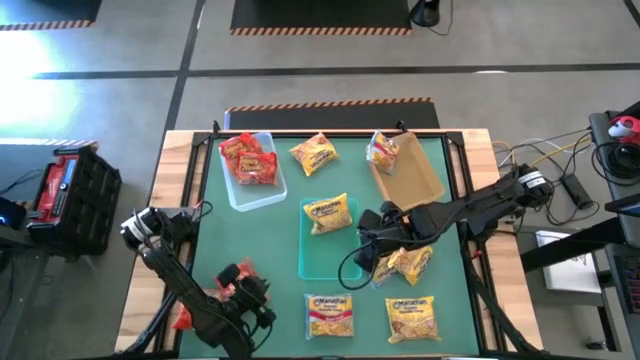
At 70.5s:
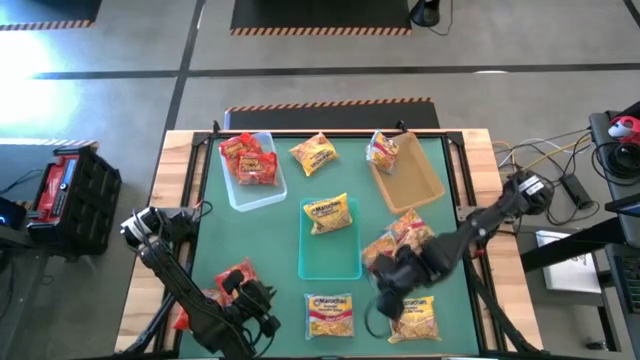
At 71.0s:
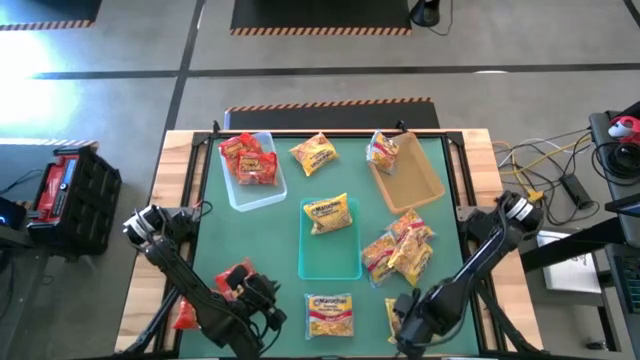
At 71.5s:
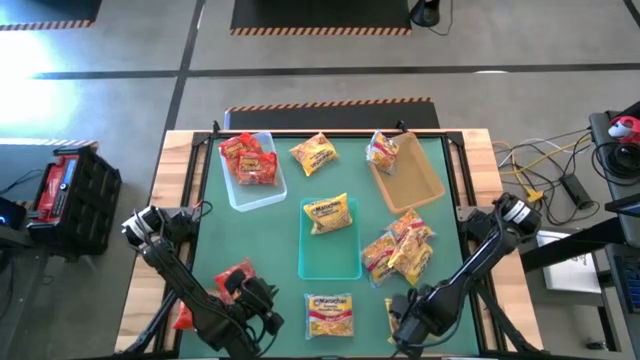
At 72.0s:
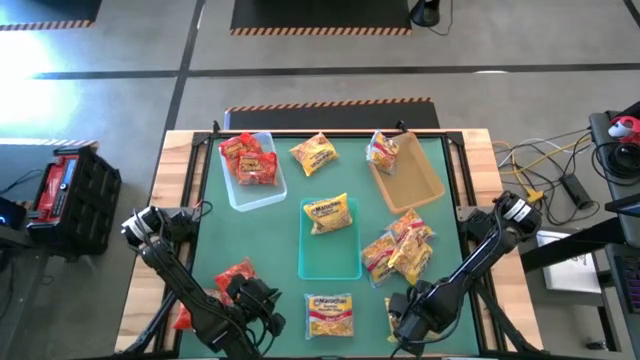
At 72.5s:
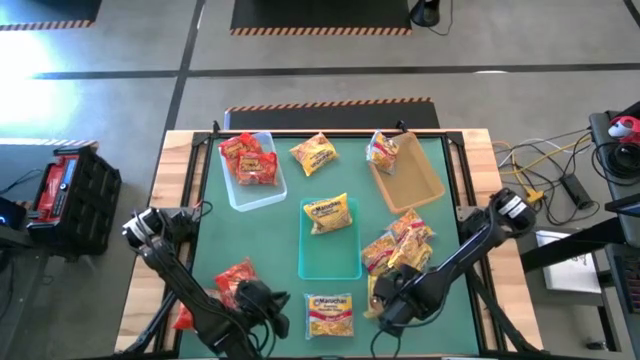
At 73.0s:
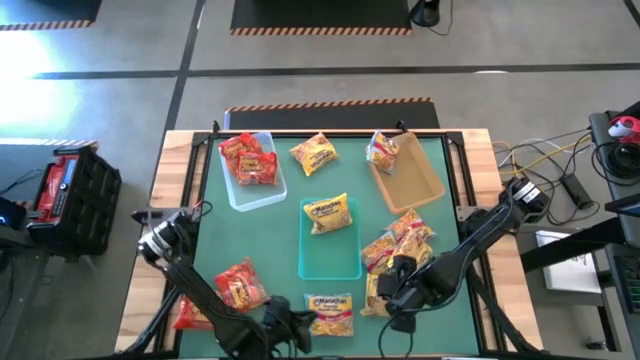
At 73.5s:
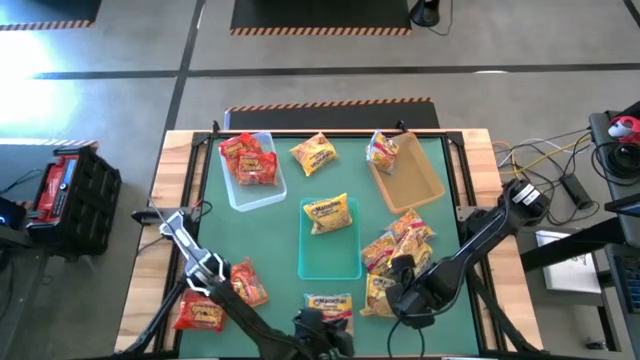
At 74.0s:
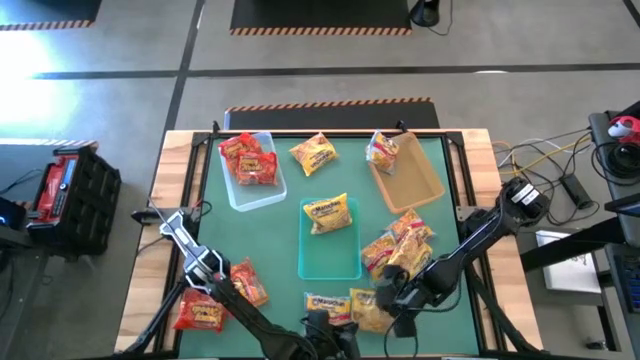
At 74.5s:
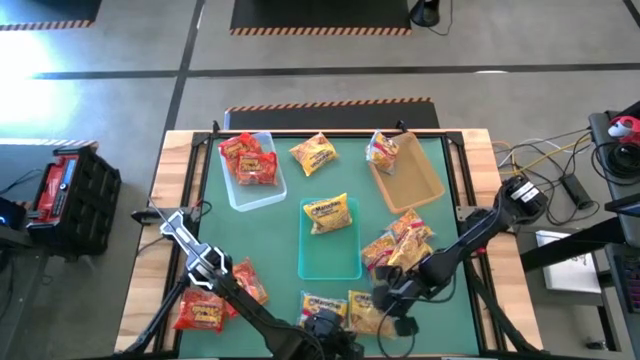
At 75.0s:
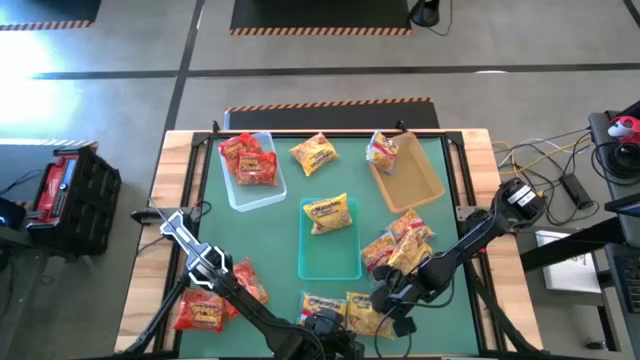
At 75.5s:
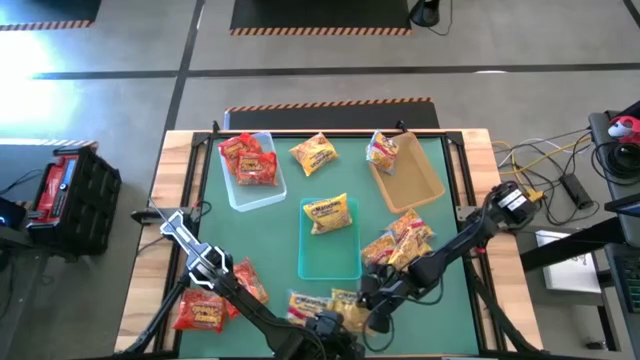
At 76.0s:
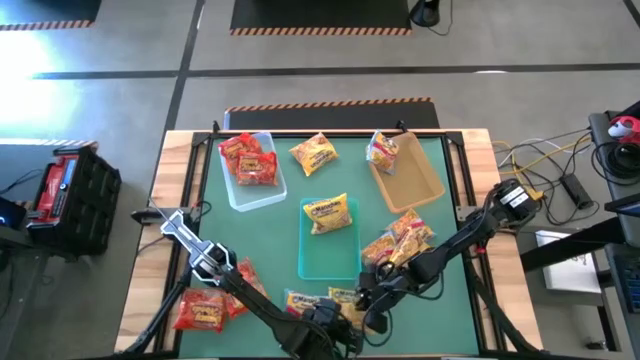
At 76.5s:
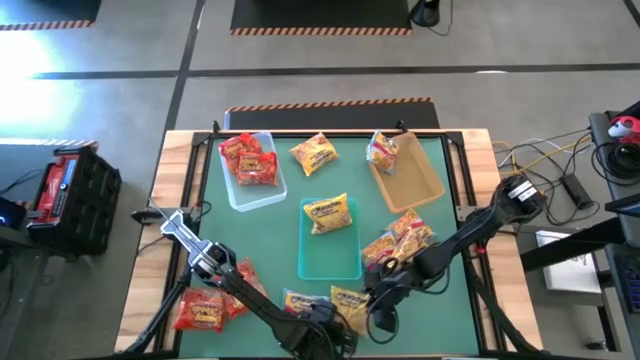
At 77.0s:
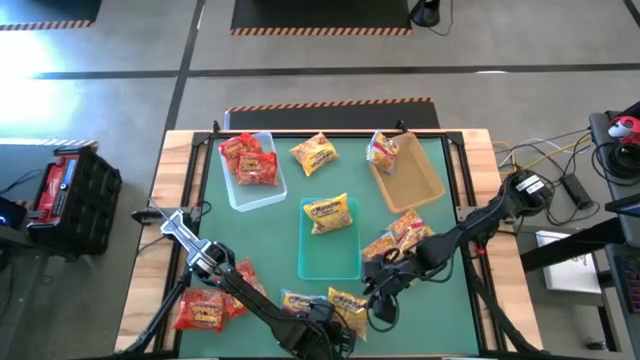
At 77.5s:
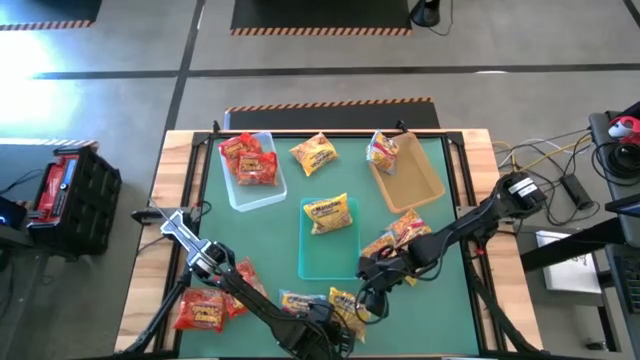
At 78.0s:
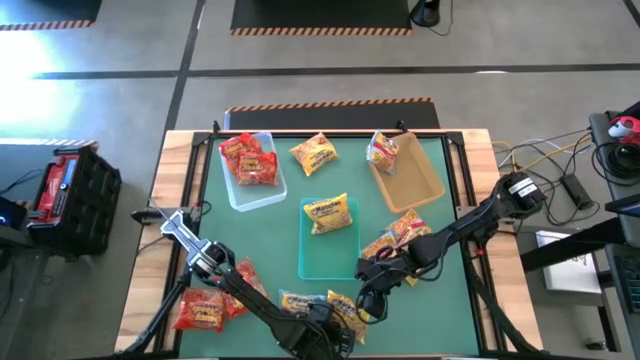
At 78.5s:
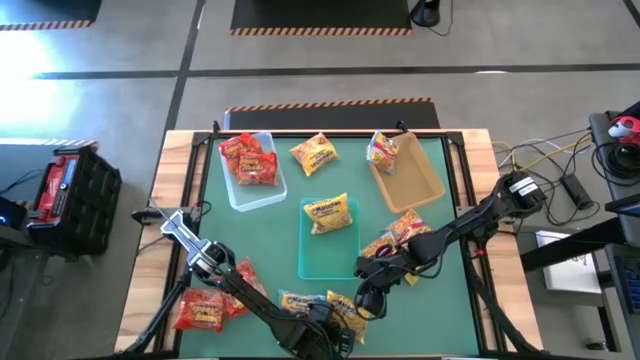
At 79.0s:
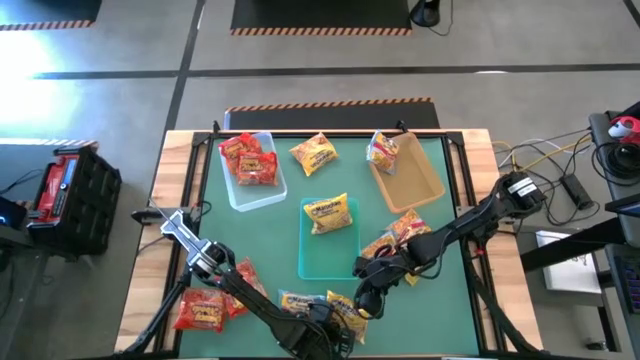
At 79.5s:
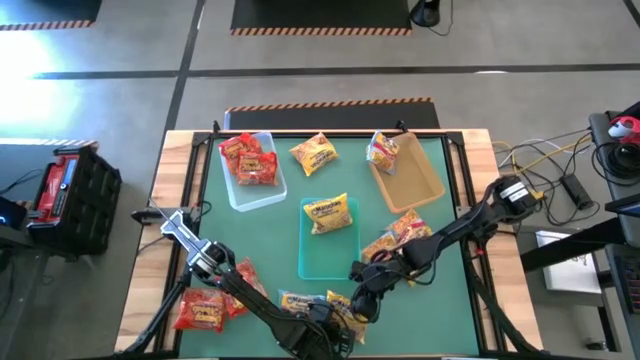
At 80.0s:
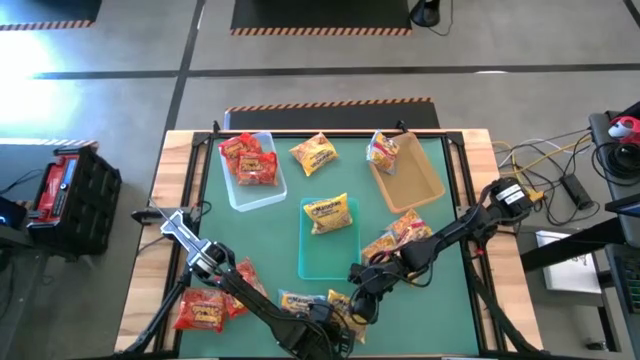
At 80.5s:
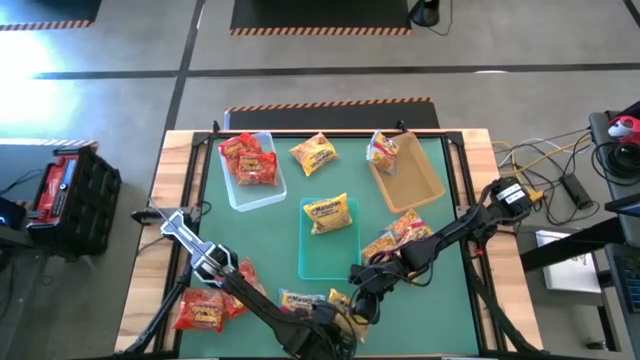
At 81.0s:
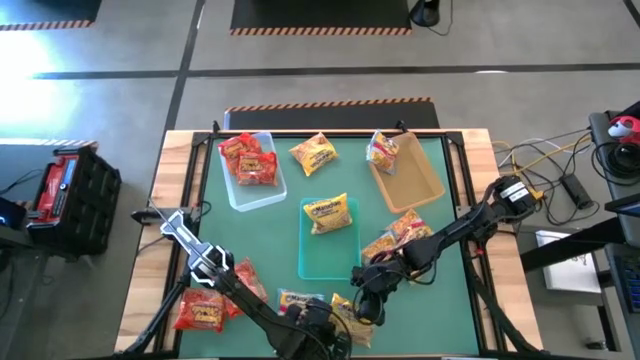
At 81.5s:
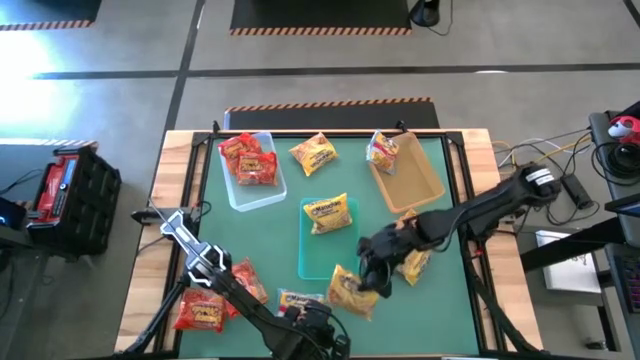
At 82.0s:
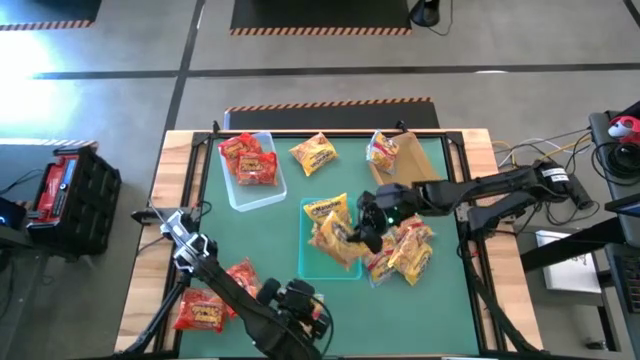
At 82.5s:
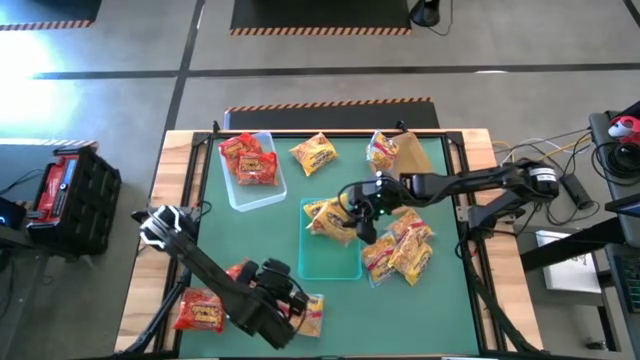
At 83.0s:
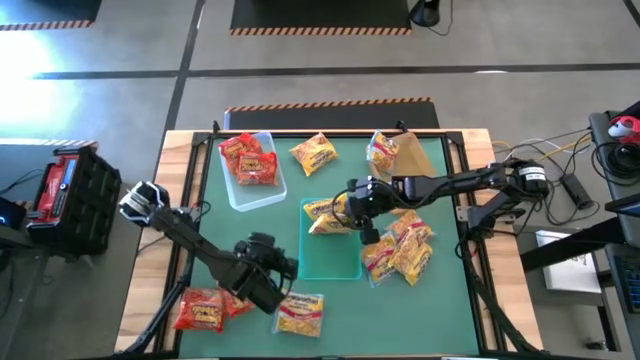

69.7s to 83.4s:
Task: Sort Maruchan noodles
Put the yellow noodle pack into the blue bin

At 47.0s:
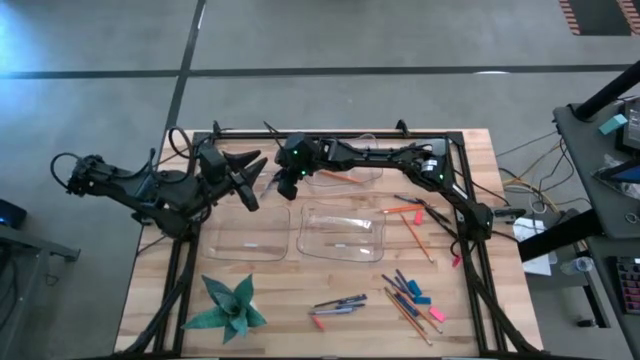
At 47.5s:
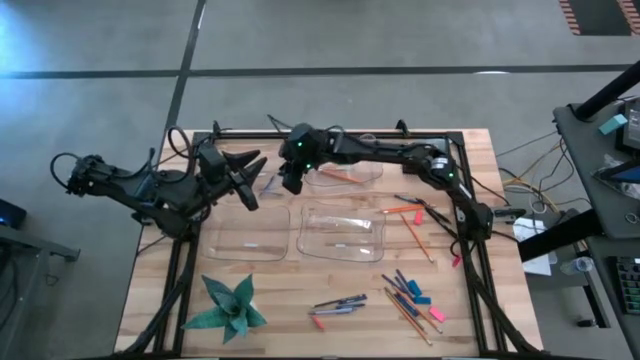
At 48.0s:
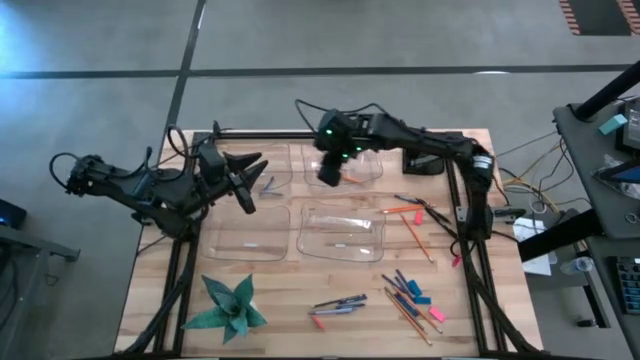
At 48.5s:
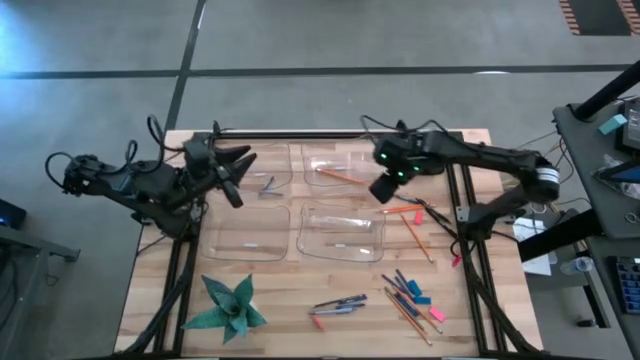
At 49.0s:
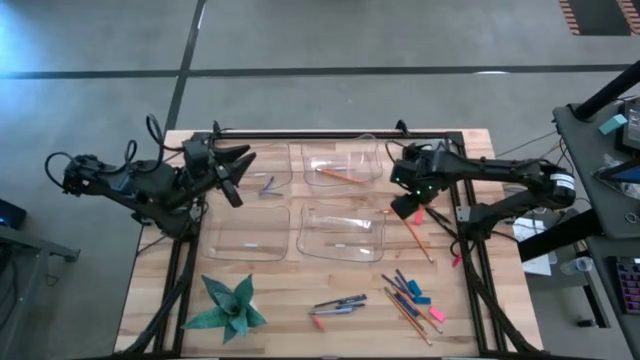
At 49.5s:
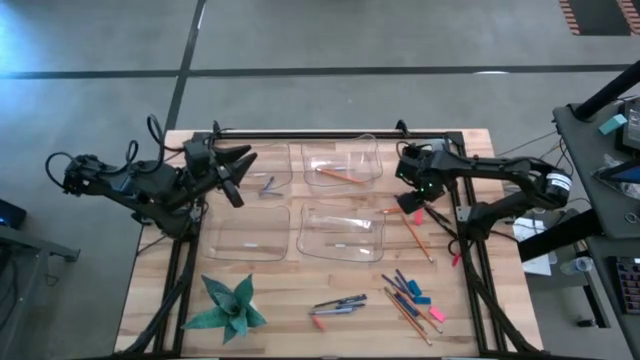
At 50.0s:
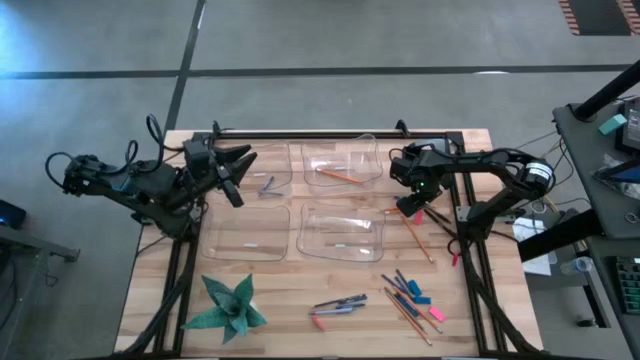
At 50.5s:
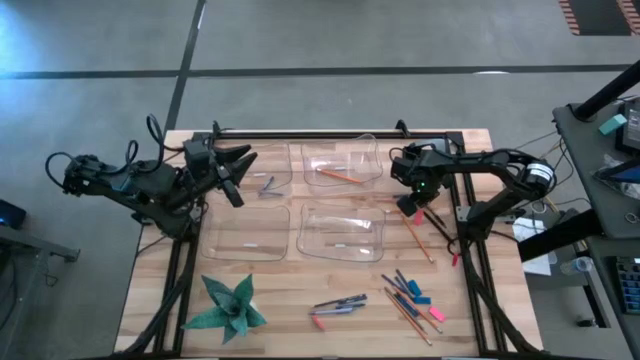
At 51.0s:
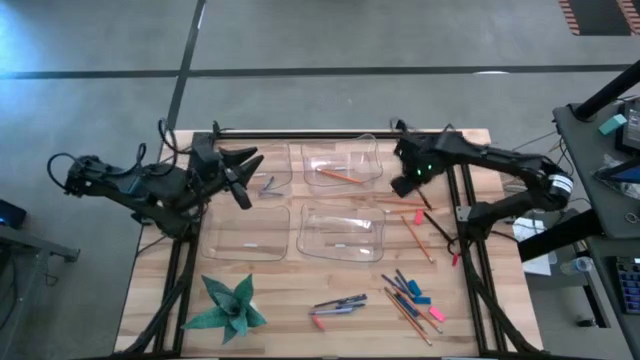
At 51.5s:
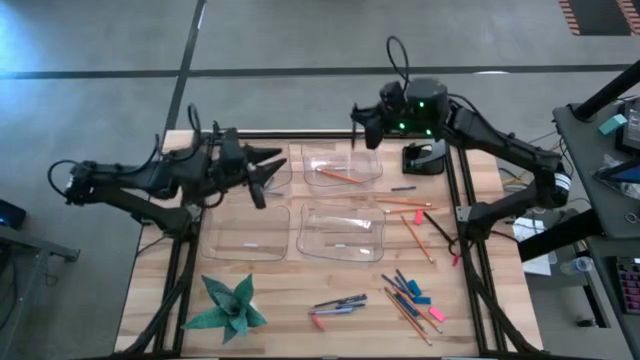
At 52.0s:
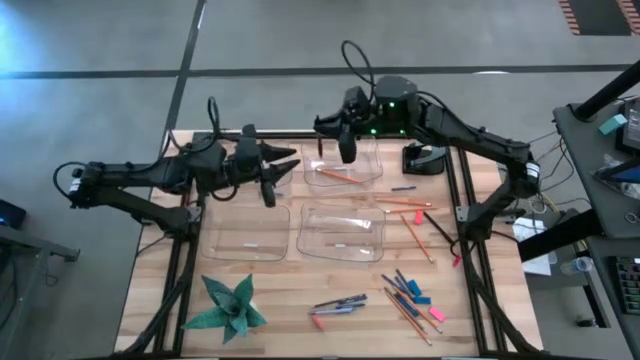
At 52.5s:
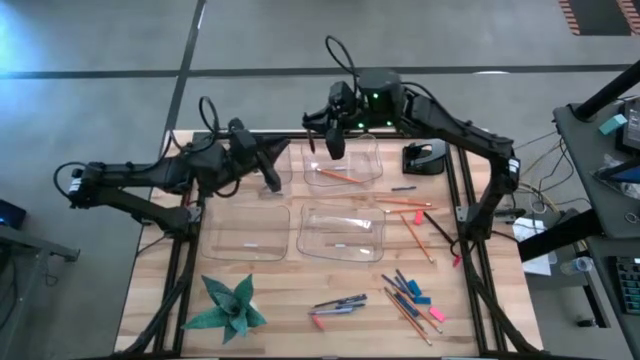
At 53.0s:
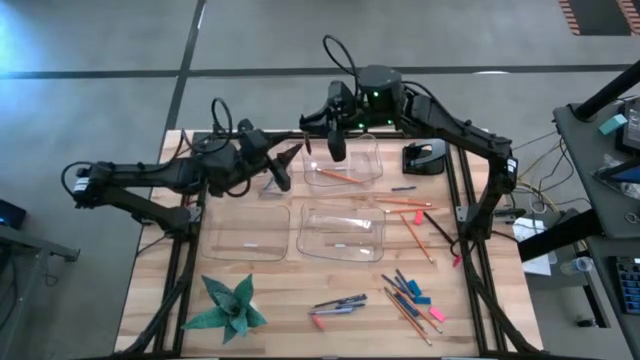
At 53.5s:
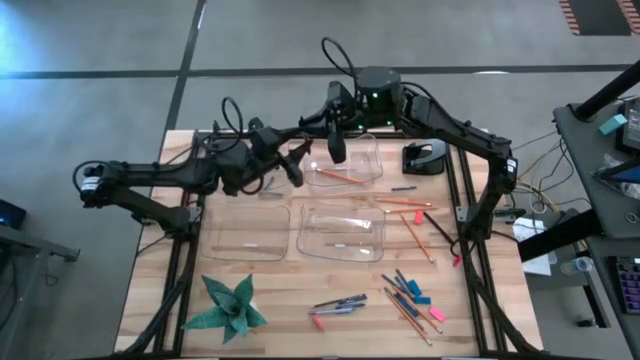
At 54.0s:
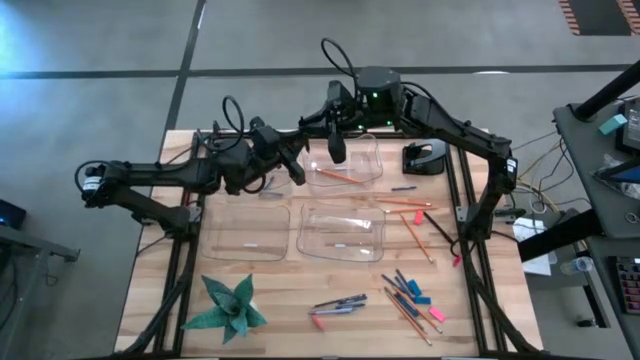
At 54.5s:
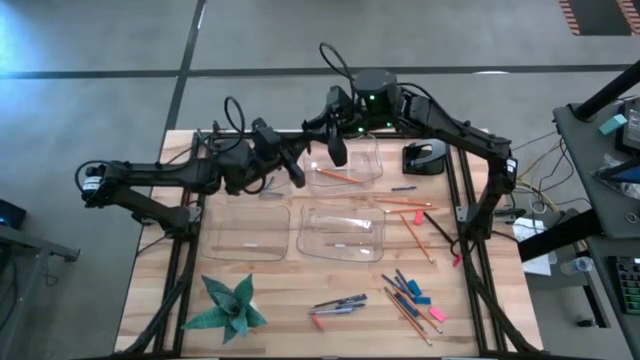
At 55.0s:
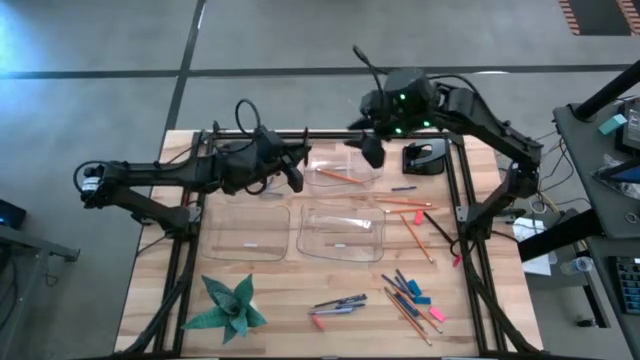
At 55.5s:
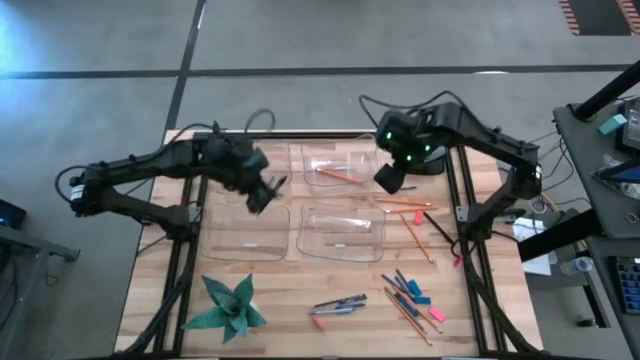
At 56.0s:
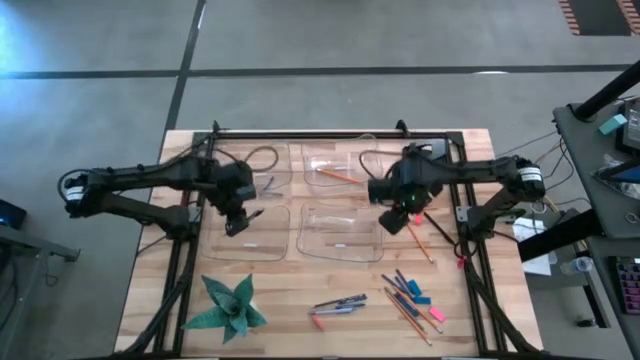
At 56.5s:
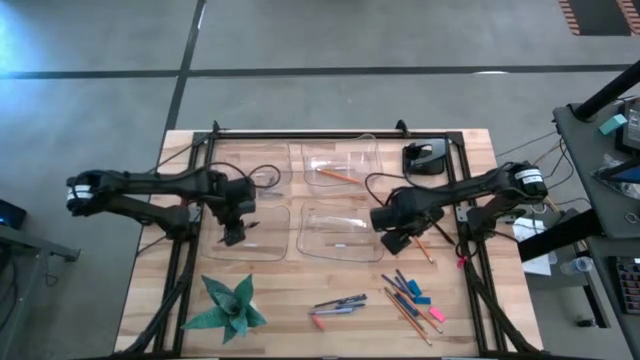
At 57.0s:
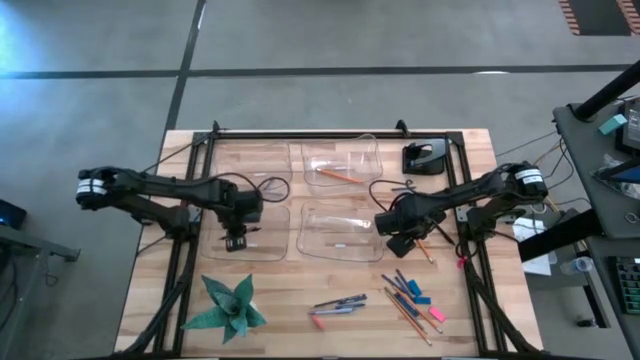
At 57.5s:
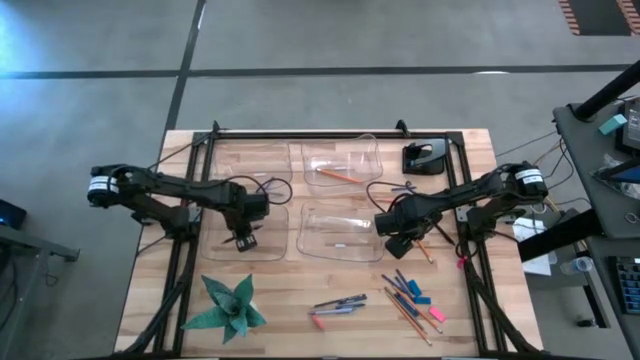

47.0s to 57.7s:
Task: Sort crayons/erasers/pens/pencils in bins
Put the black pen into the bottom left transparent bin
